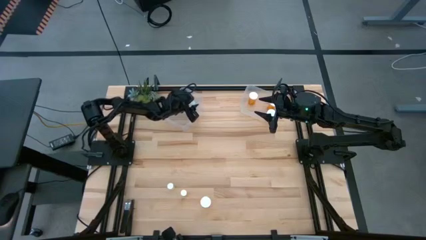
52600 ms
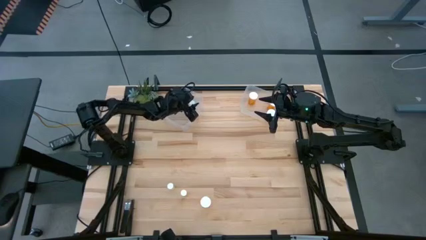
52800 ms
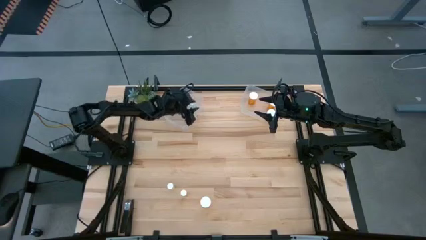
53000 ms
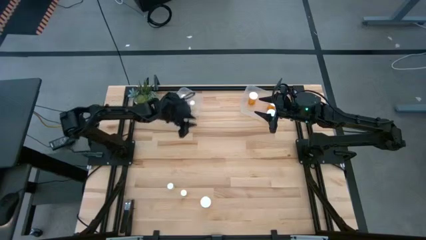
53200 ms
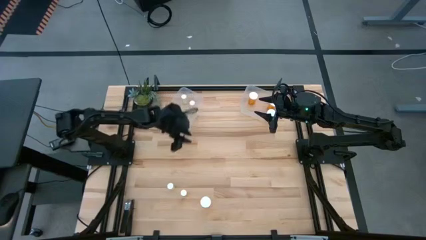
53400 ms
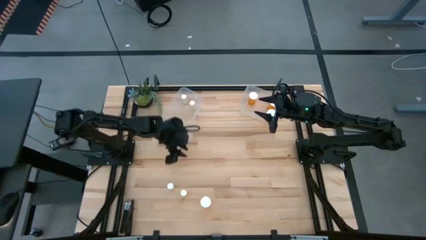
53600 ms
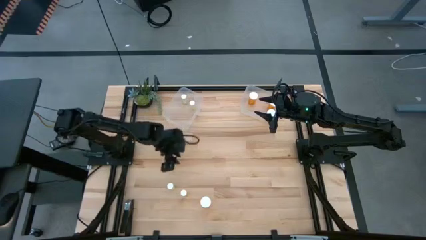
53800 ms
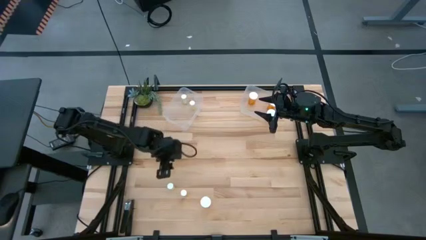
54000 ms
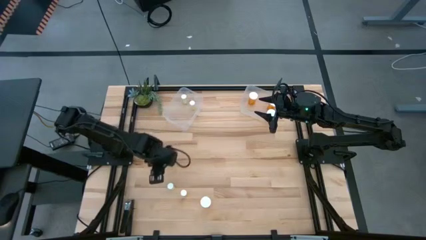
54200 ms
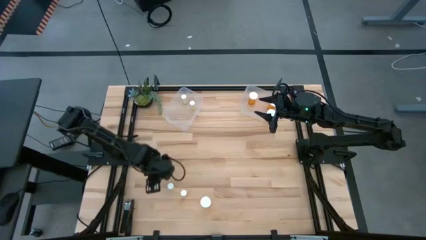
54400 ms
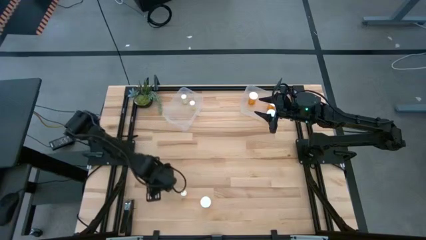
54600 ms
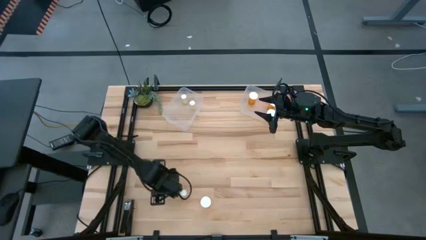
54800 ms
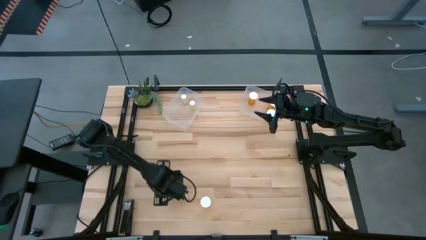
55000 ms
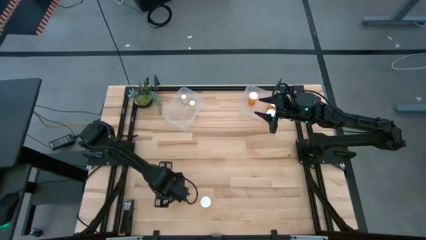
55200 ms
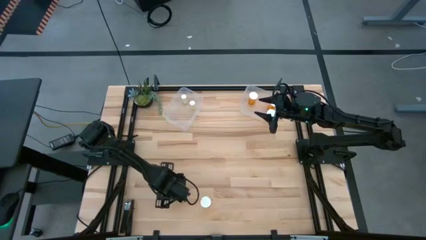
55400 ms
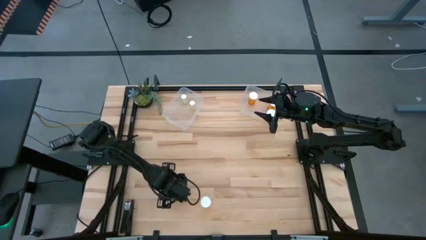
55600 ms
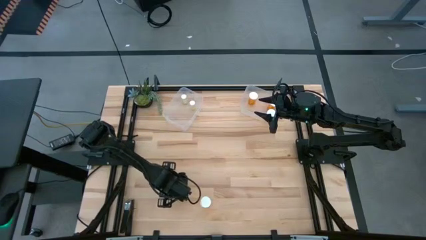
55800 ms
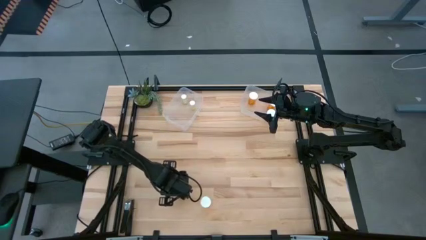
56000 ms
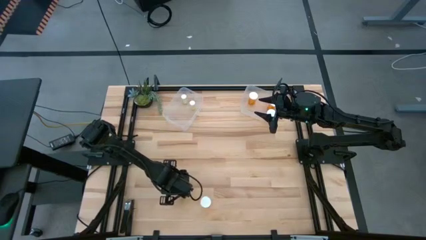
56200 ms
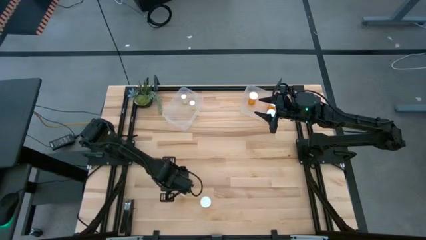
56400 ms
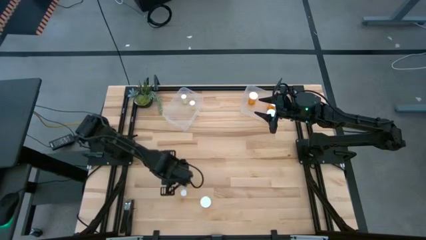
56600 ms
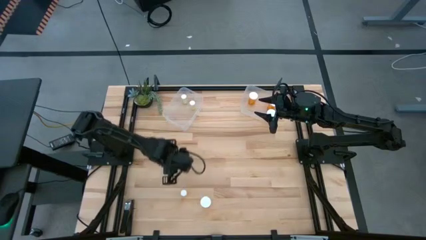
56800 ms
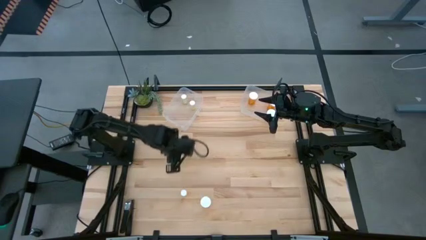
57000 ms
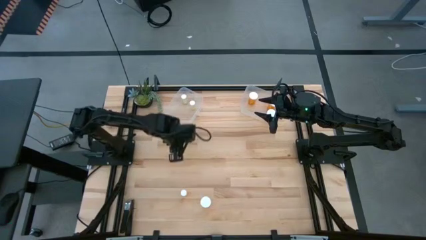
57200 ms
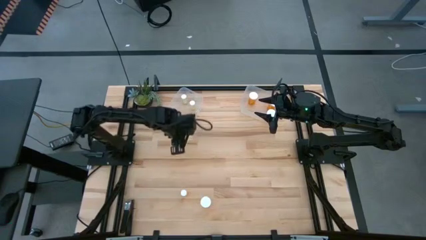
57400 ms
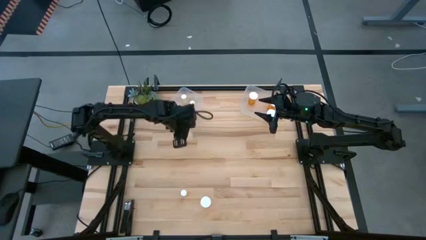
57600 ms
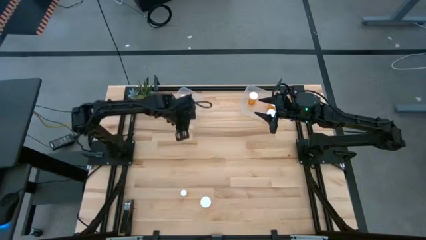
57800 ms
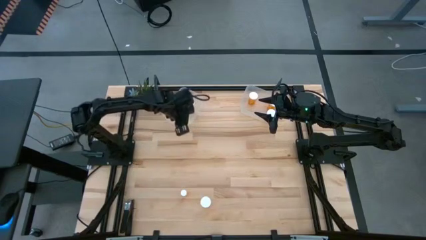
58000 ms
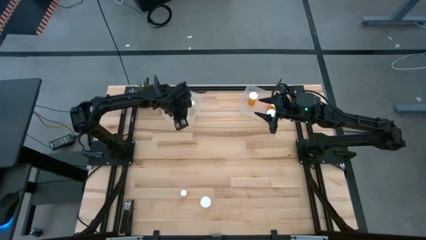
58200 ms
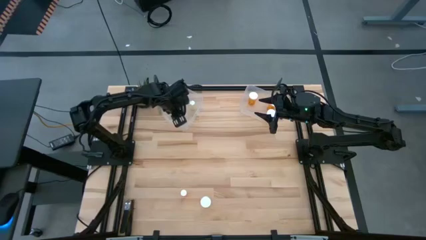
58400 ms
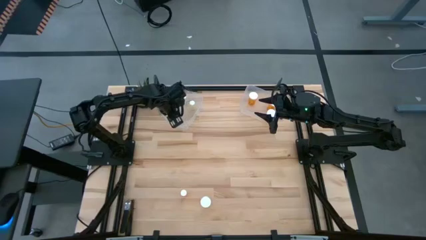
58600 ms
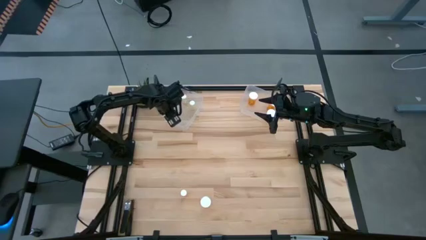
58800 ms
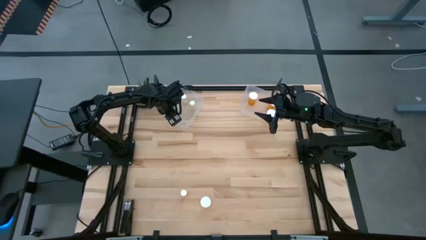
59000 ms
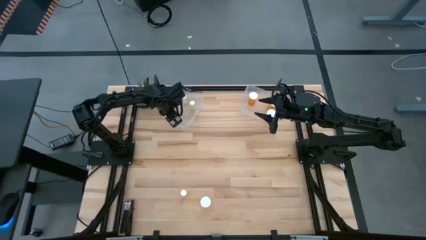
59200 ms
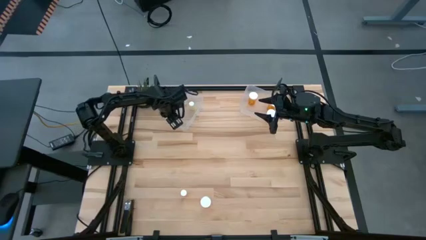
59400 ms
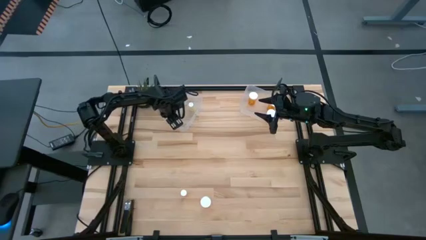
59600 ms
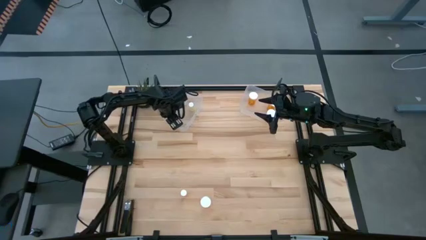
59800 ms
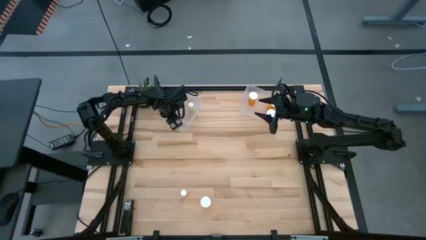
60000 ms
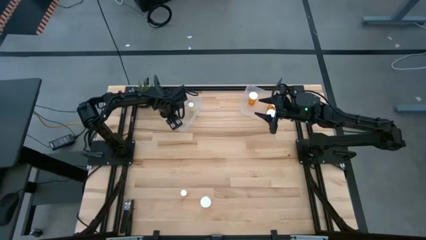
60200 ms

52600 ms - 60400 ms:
Task: Pick and place medicine bottles into bin by pill shape (circle, oval)
Put the small yellow tablet bottle into the left transparent bin

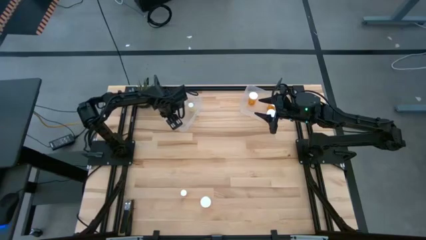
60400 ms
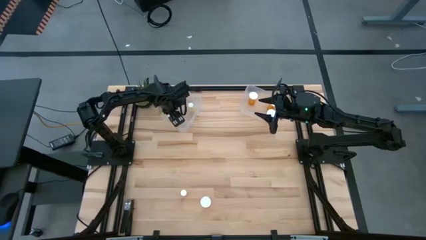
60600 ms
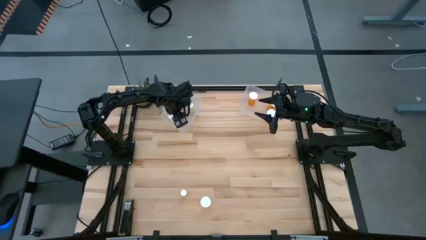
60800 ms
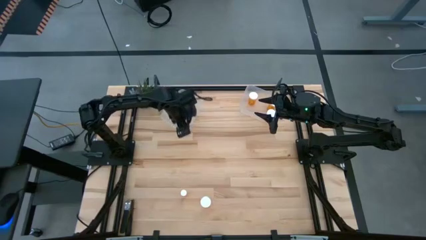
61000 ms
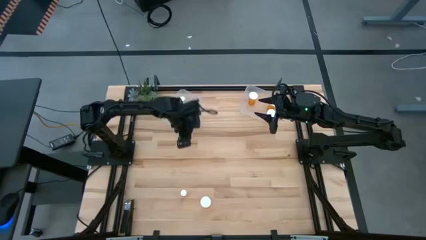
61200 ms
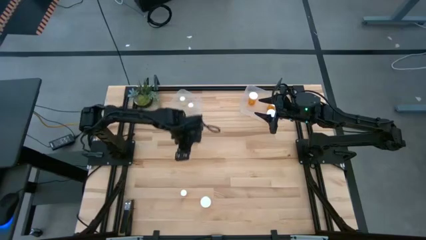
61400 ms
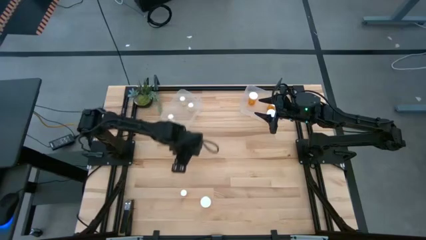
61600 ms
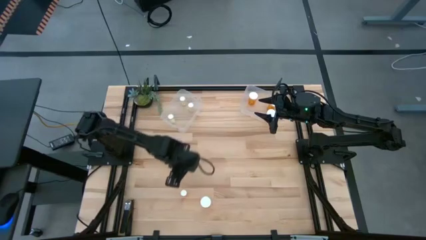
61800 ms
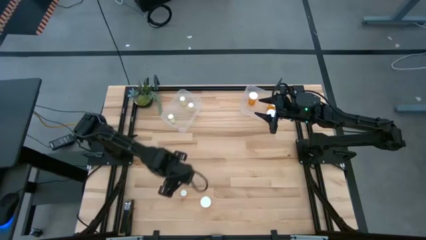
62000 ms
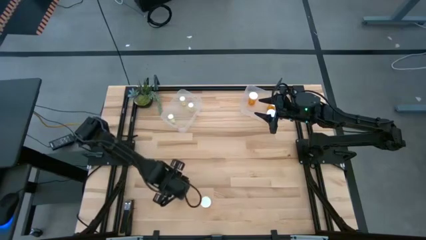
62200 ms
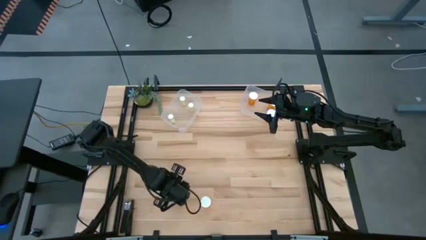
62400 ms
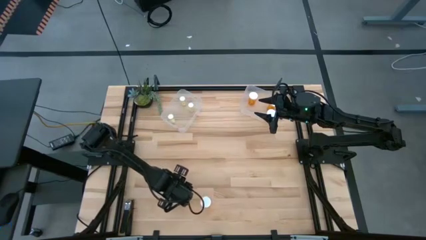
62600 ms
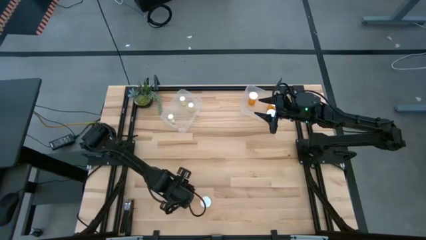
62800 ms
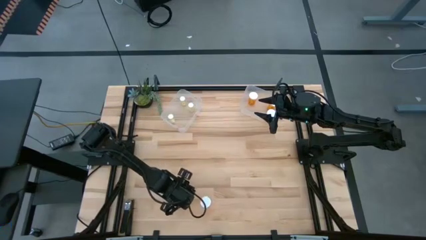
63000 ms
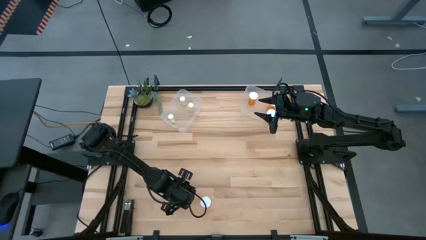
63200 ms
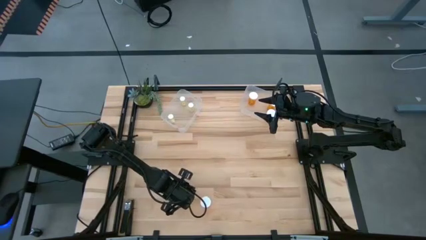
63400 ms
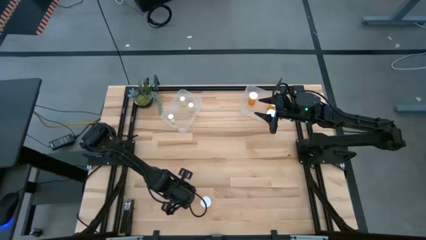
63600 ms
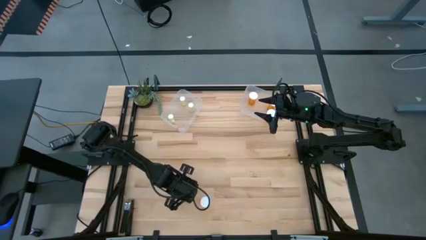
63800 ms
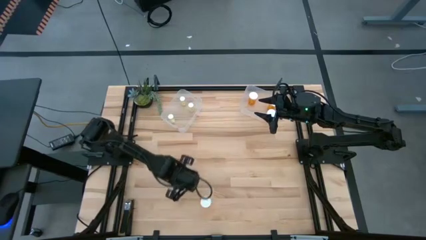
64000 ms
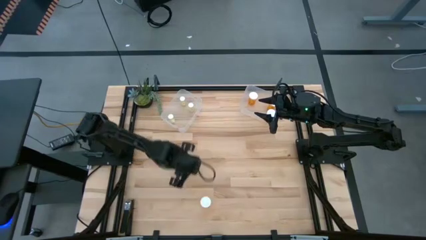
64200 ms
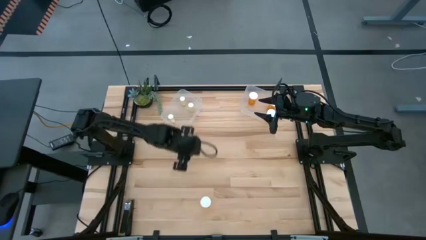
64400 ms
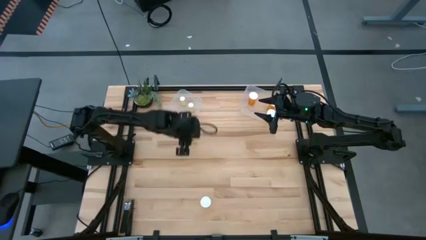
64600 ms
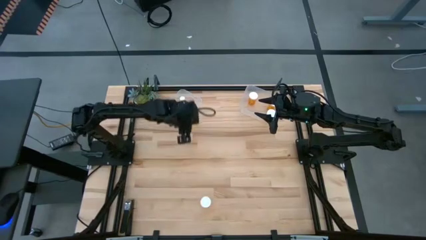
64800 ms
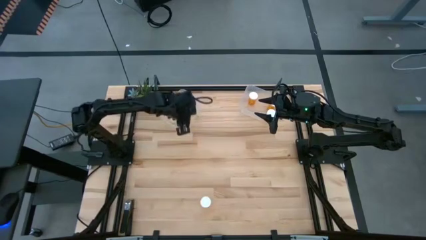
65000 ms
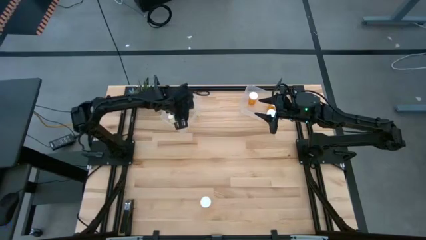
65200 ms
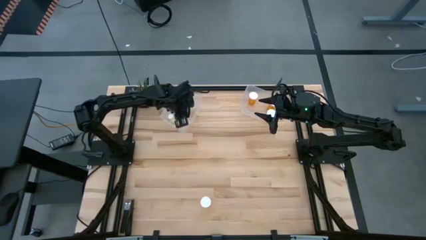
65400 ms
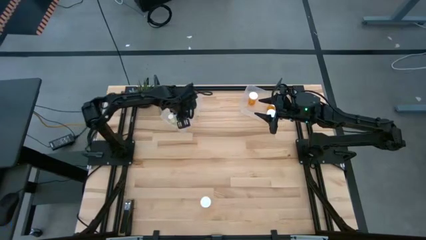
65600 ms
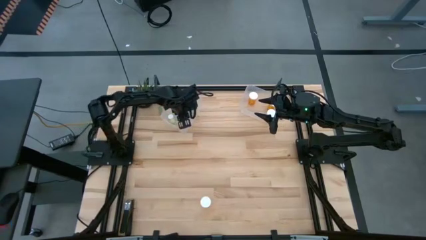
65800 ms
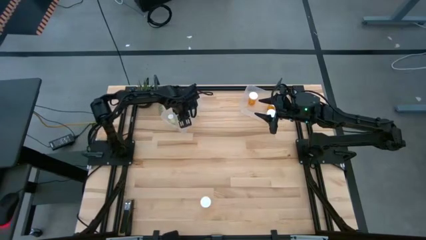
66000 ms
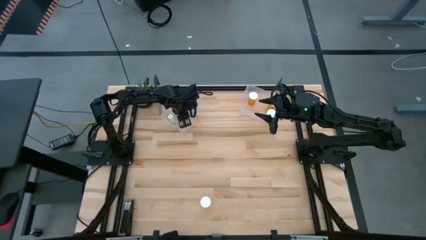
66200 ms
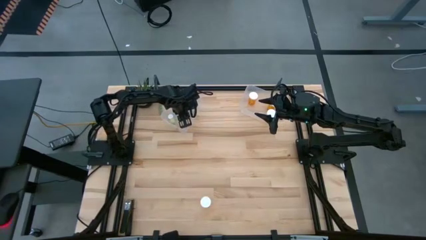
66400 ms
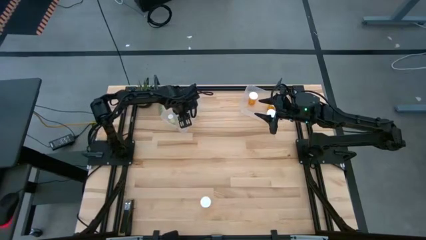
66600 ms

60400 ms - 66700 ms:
Put the small orange tablet bottle into the left transparent bin
